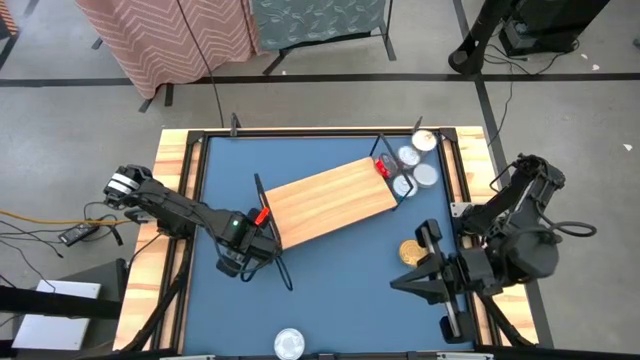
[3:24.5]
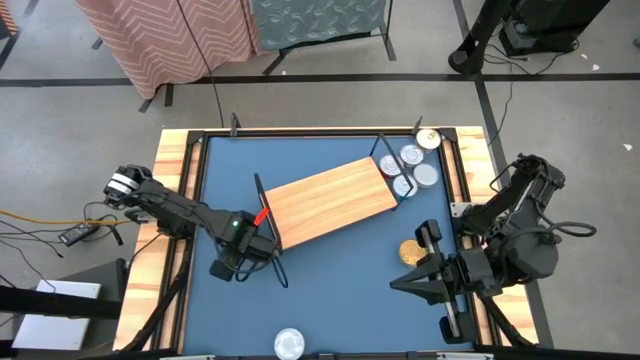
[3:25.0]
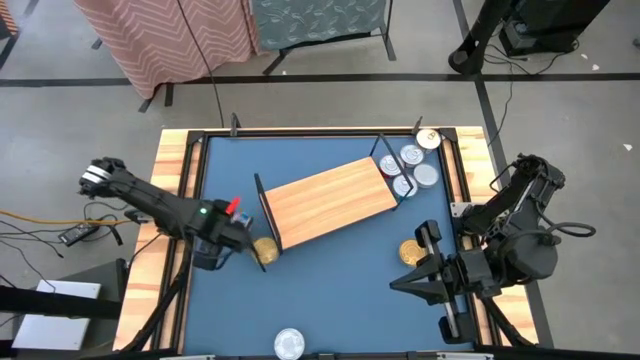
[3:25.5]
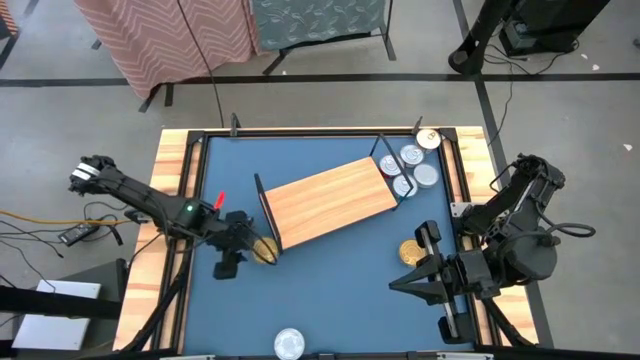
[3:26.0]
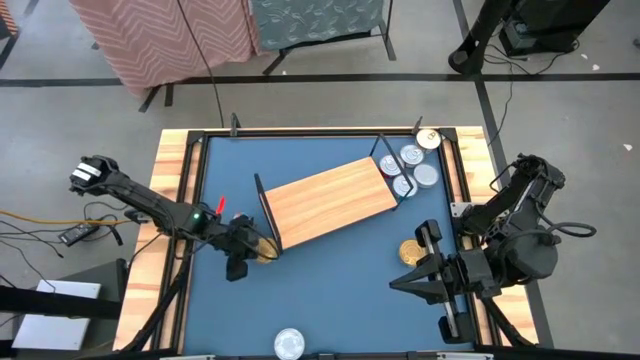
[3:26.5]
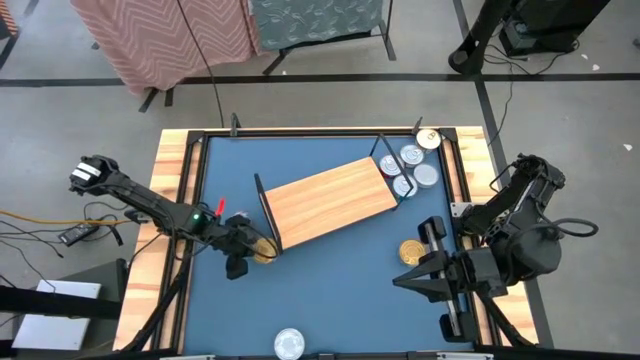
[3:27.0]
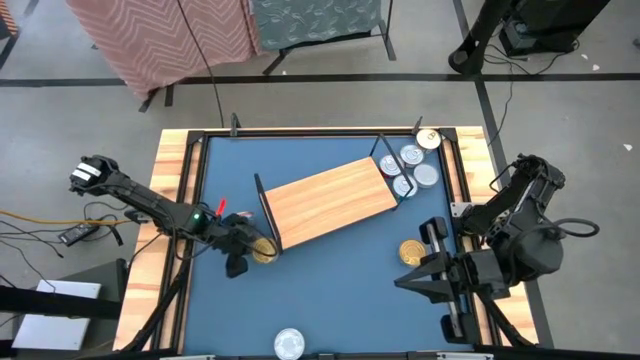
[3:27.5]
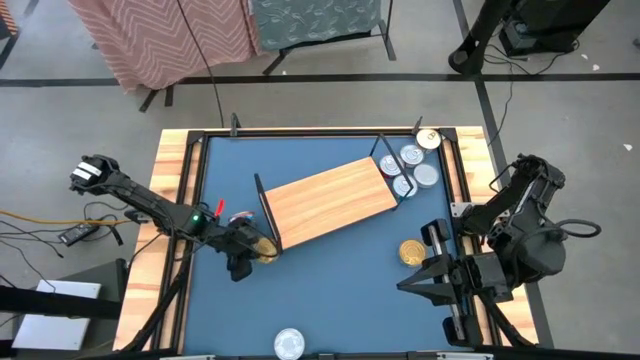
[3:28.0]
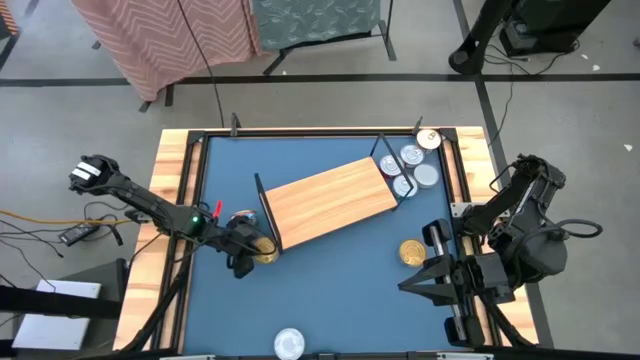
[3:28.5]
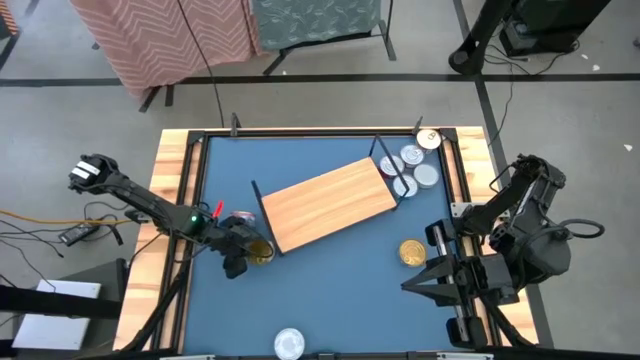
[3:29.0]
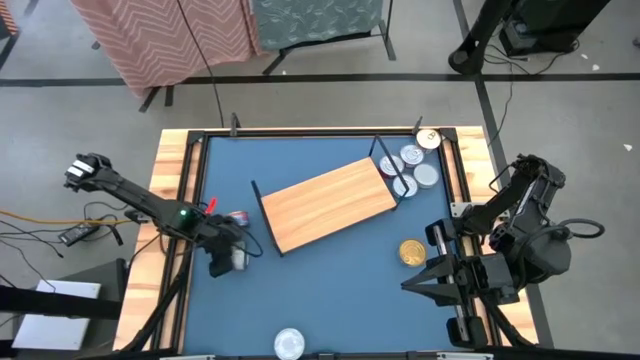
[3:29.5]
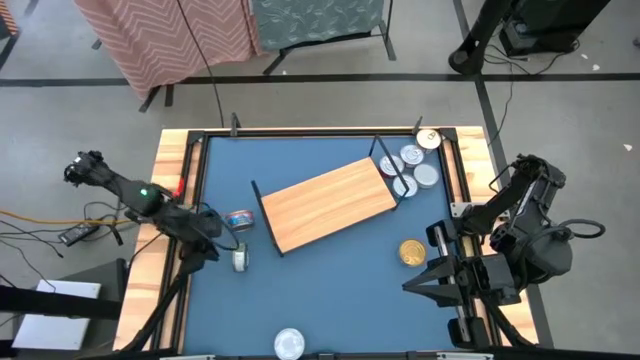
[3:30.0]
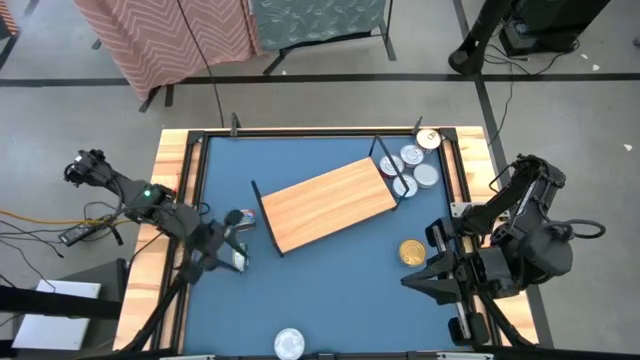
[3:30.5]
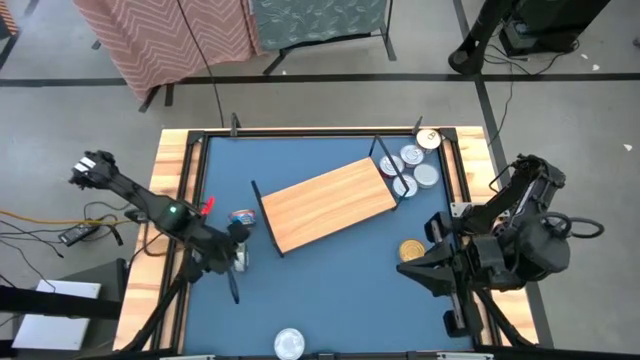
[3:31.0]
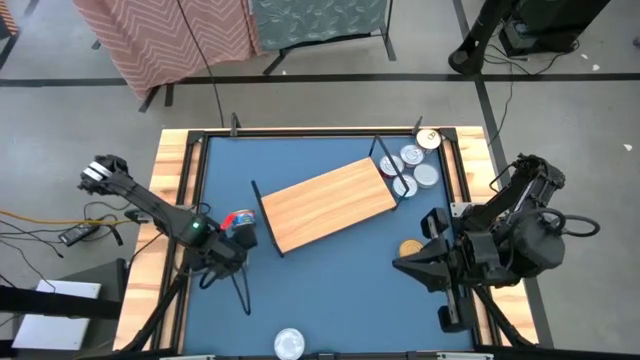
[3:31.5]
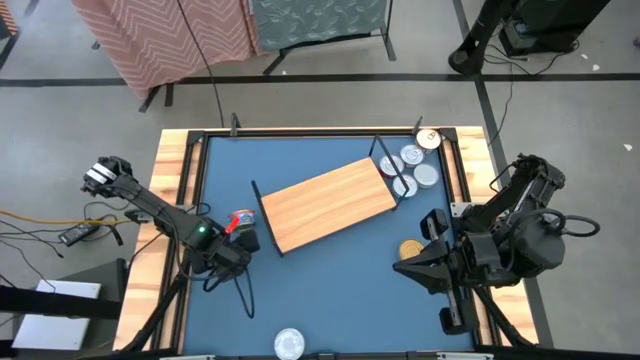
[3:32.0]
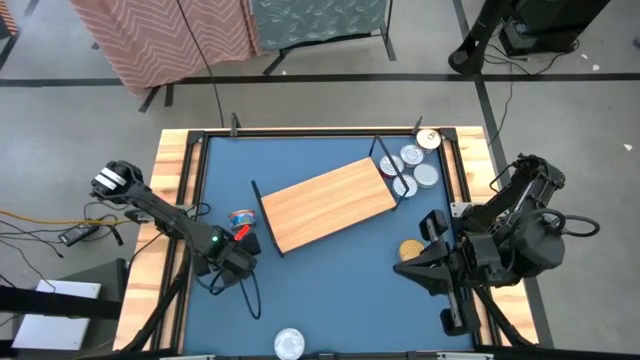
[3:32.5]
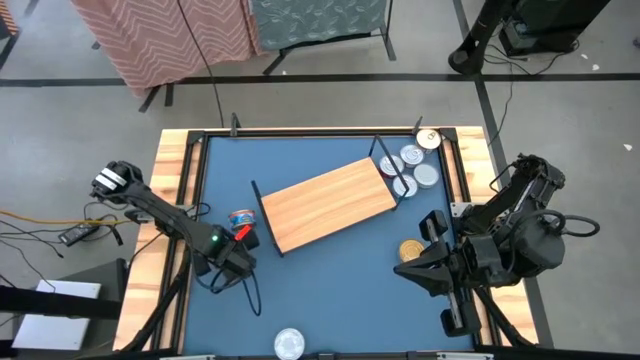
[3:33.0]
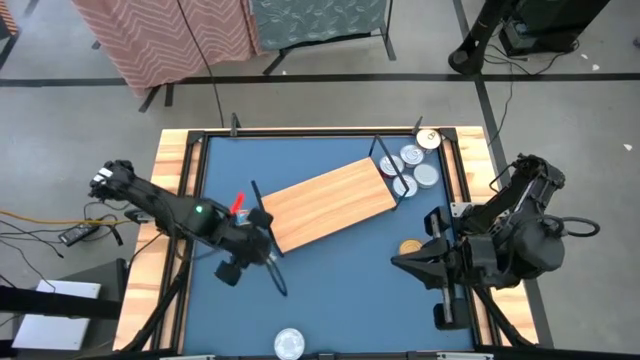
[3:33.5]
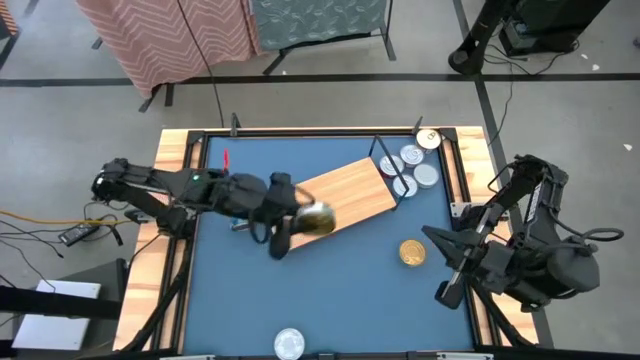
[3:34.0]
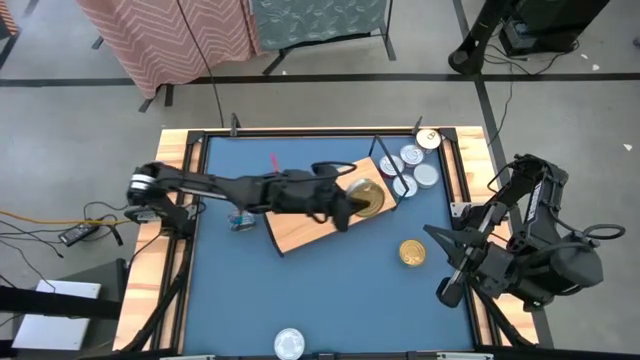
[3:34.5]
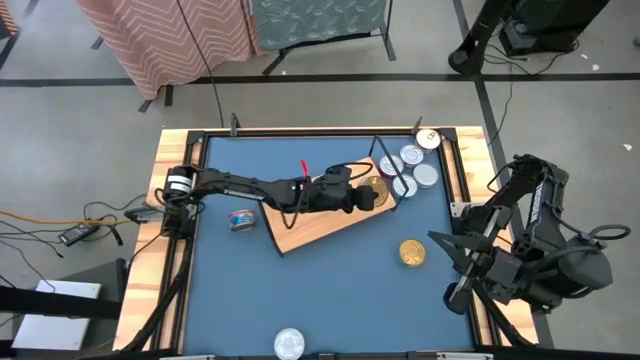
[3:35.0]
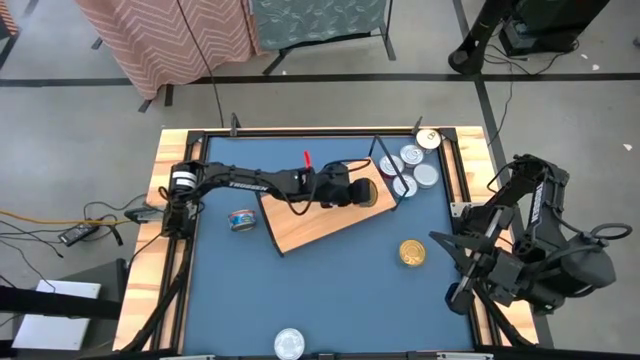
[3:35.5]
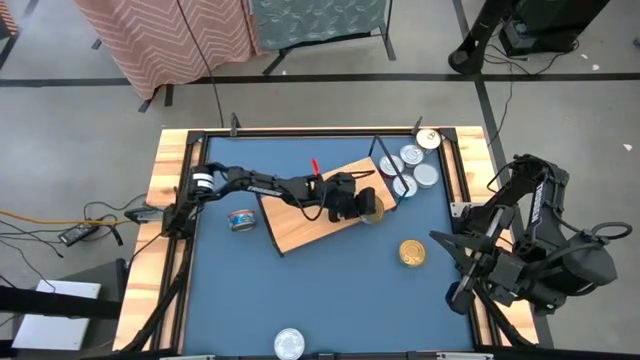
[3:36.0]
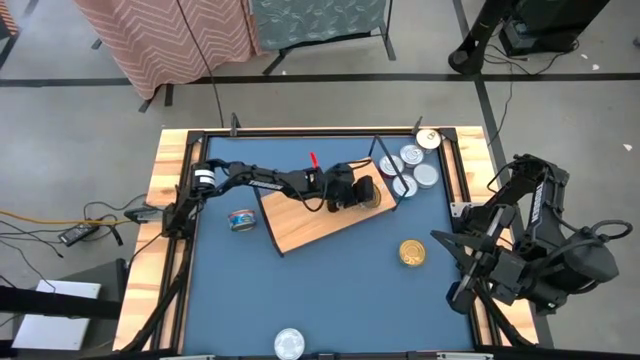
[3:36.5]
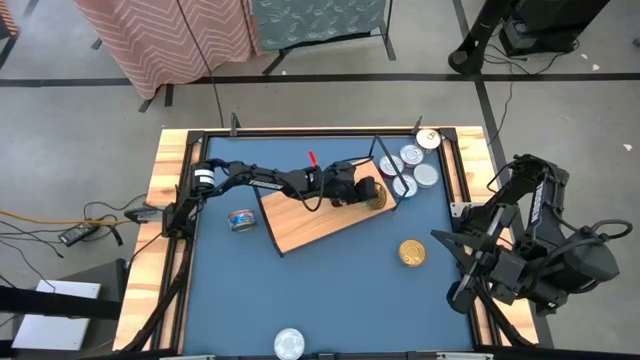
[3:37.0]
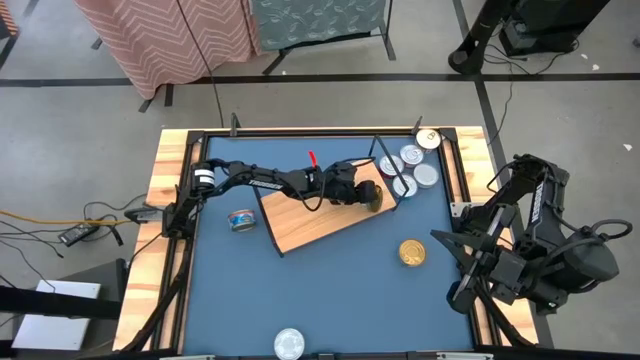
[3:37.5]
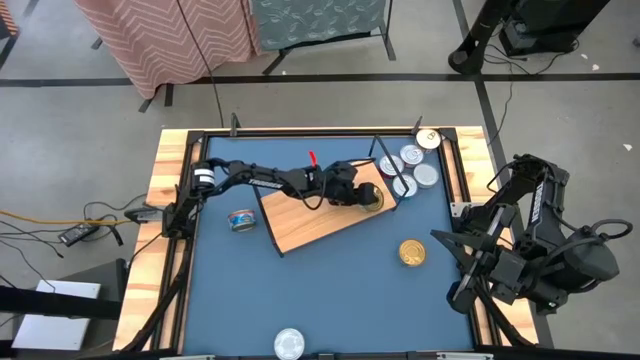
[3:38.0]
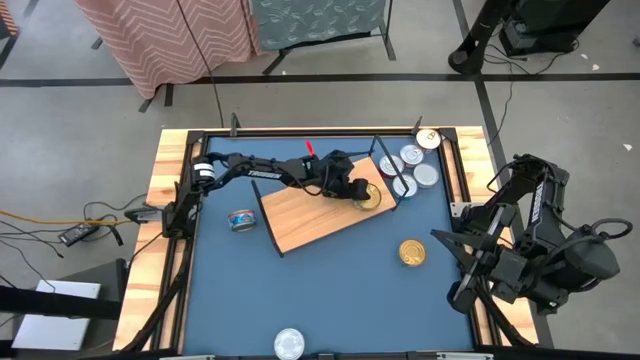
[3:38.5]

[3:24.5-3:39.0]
Task: Stack canned seafood by type on shelf
Put the blue/pink tuna can on the shelf

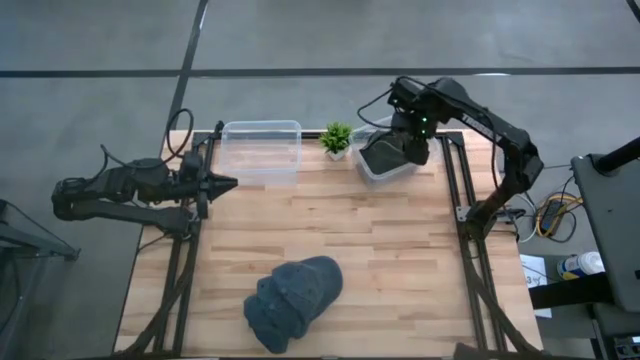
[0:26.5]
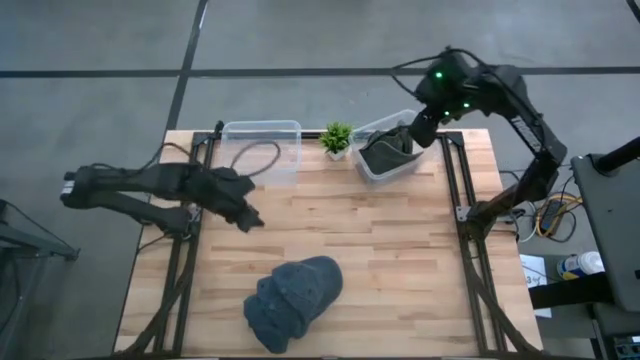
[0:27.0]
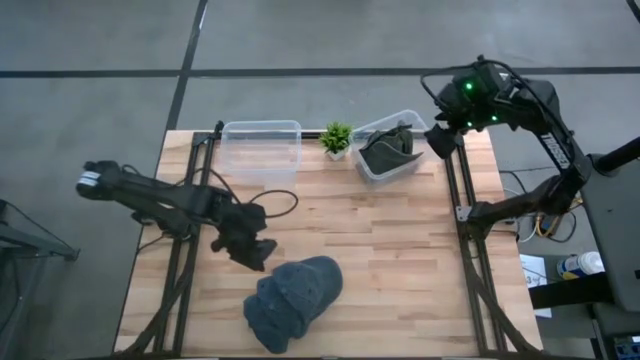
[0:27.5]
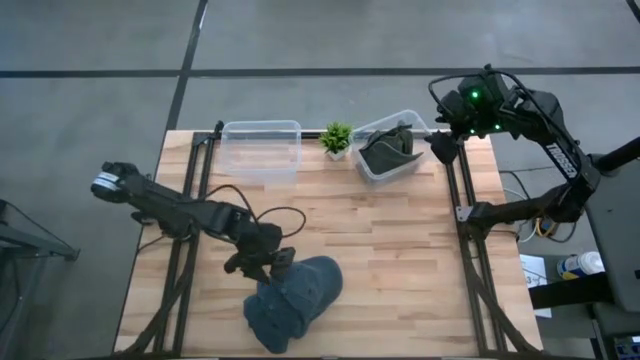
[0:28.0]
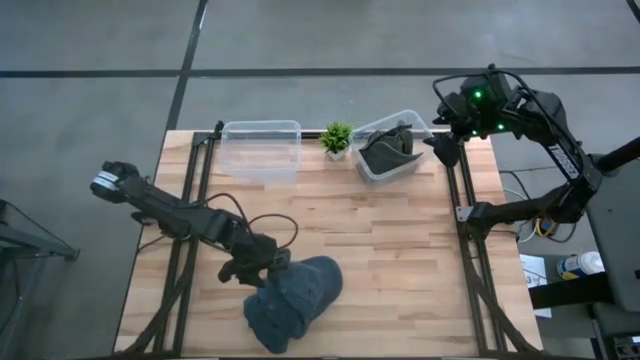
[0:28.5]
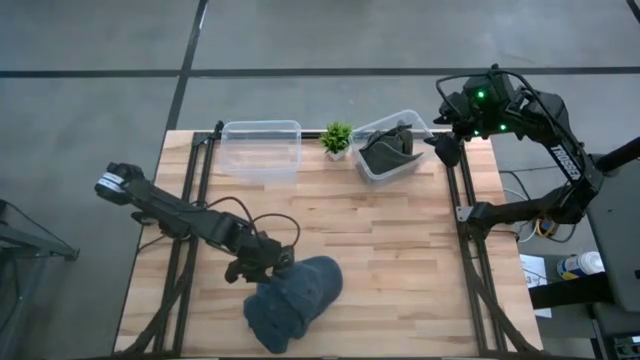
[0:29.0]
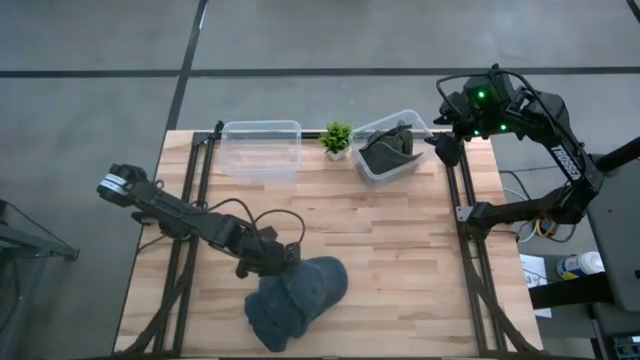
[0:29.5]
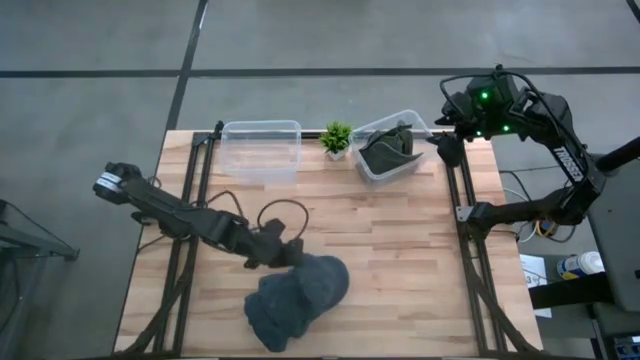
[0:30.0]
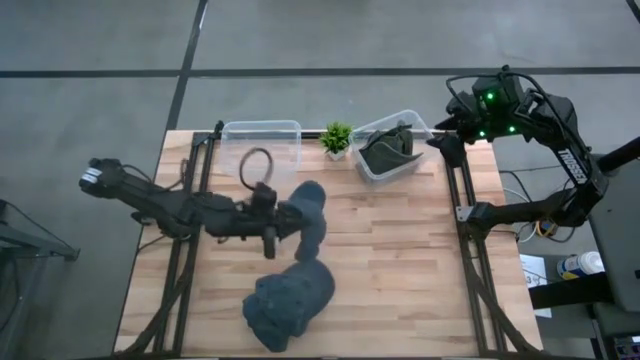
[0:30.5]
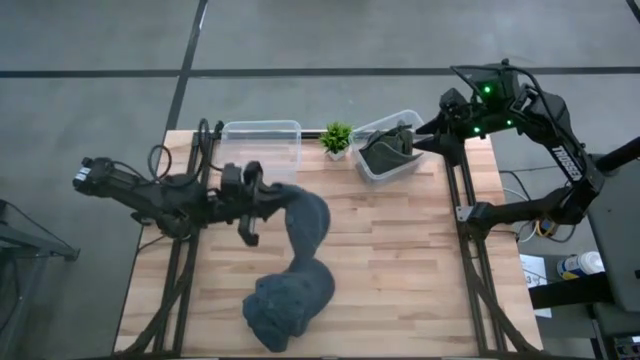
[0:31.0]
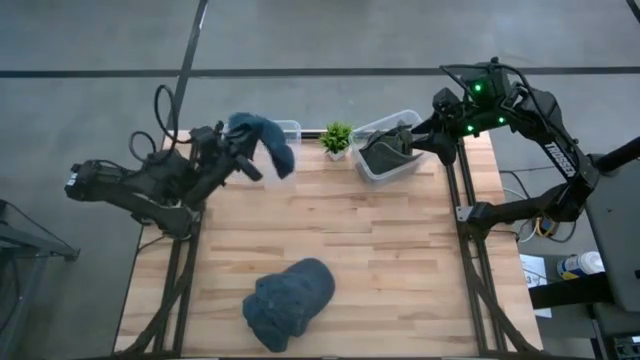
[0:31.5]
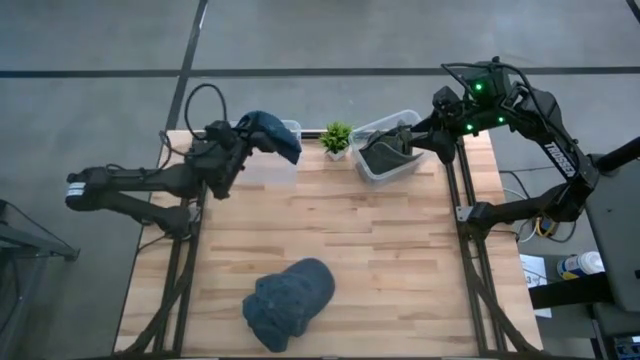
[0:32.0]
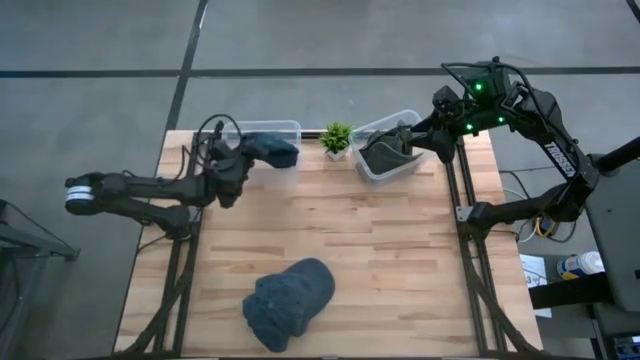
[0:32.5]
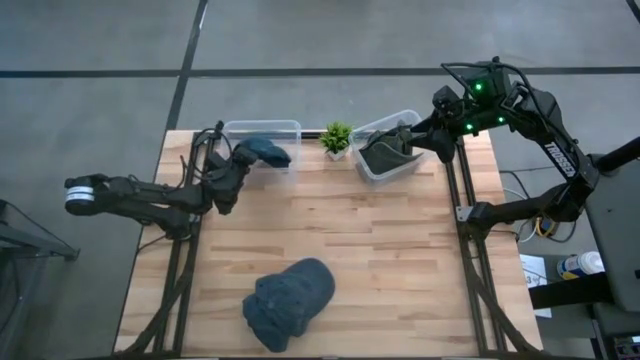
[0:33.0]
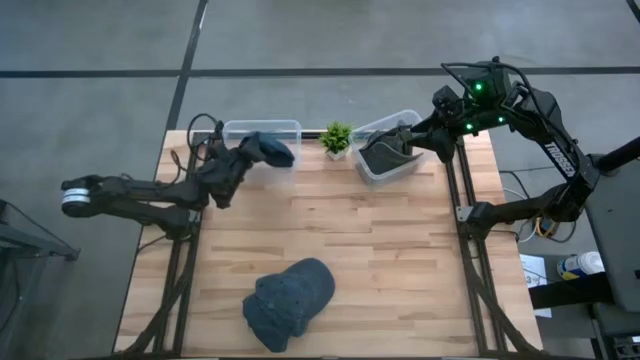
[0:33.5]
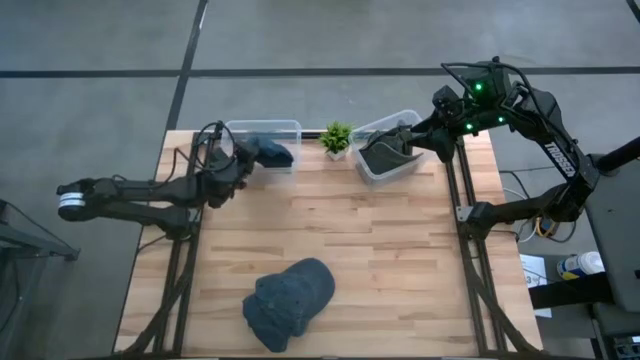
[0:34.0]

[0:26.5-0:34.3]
Task: Pick & Place hat
Put the top dark blue cap into the left transparent bin
